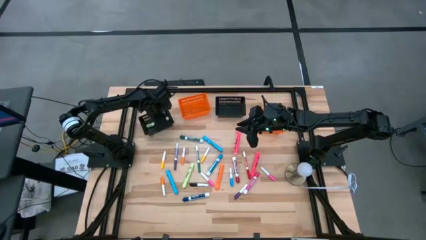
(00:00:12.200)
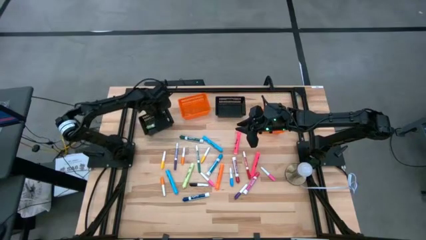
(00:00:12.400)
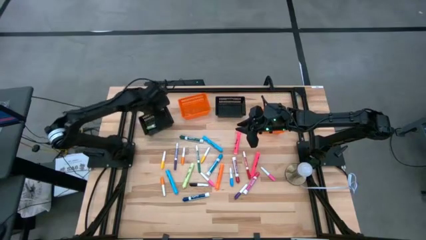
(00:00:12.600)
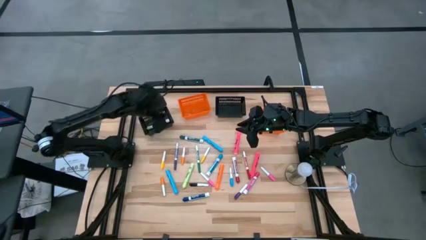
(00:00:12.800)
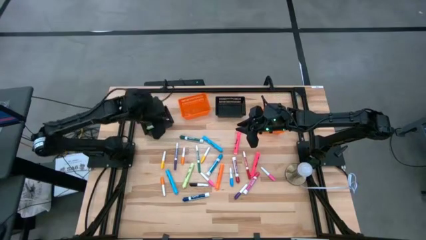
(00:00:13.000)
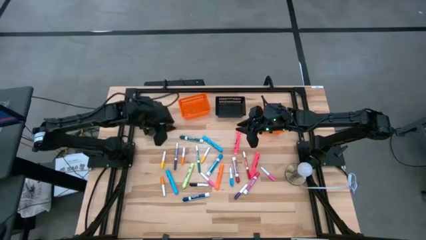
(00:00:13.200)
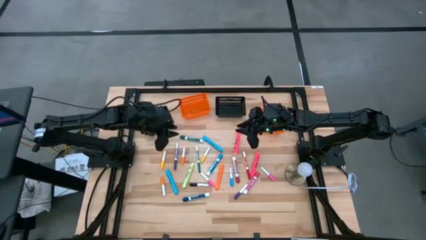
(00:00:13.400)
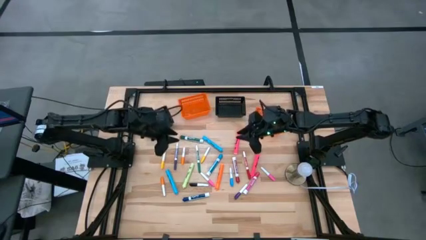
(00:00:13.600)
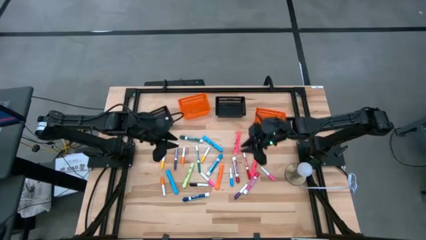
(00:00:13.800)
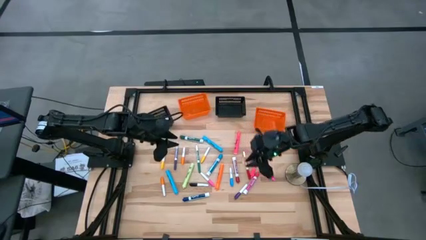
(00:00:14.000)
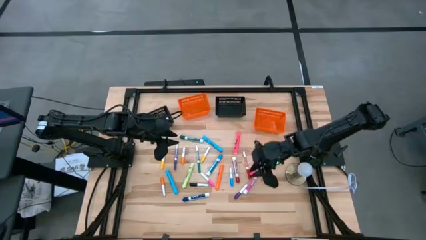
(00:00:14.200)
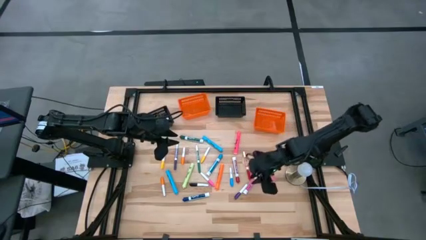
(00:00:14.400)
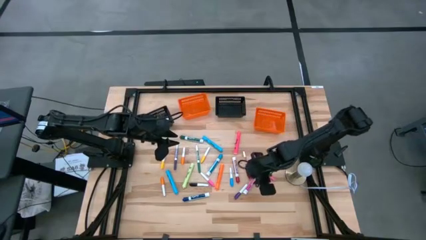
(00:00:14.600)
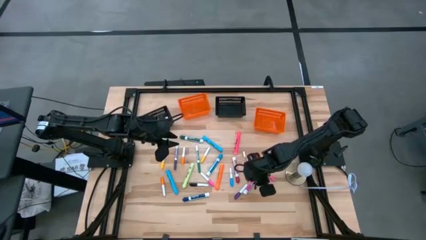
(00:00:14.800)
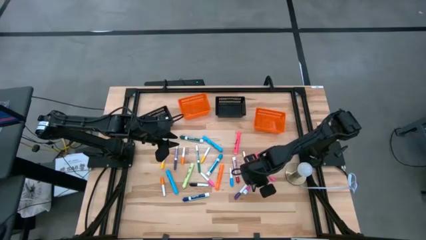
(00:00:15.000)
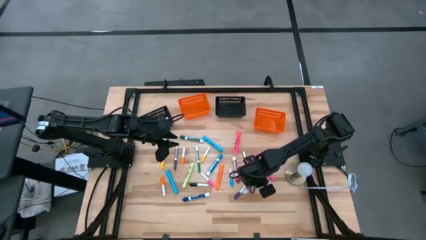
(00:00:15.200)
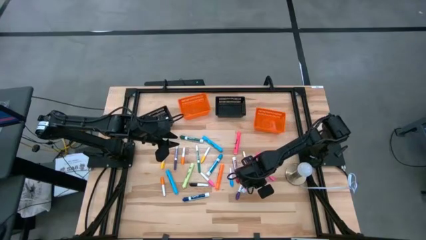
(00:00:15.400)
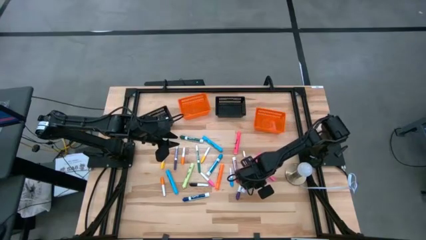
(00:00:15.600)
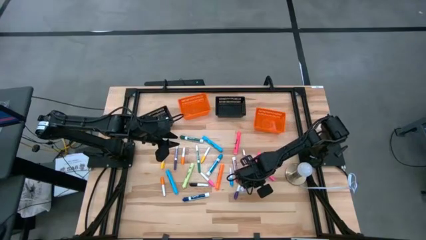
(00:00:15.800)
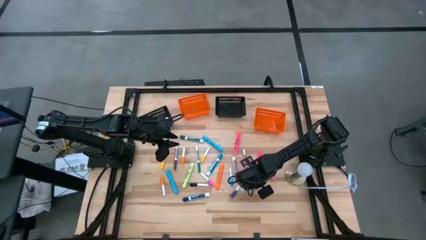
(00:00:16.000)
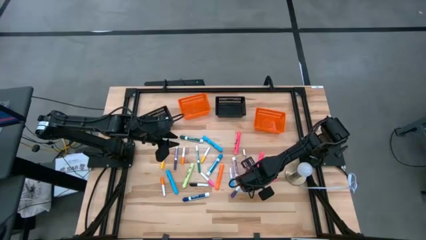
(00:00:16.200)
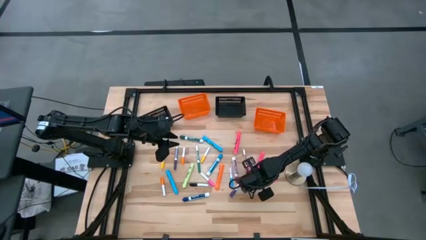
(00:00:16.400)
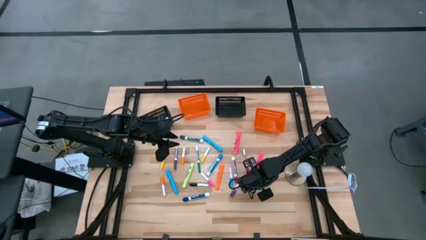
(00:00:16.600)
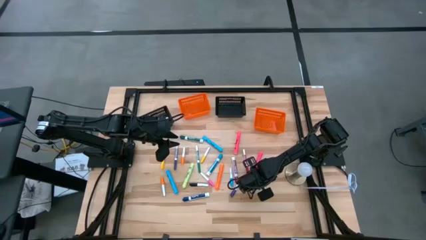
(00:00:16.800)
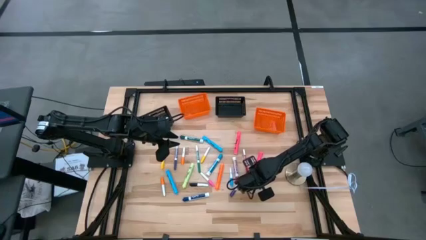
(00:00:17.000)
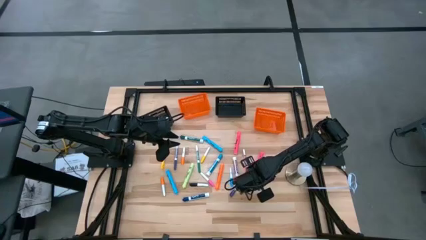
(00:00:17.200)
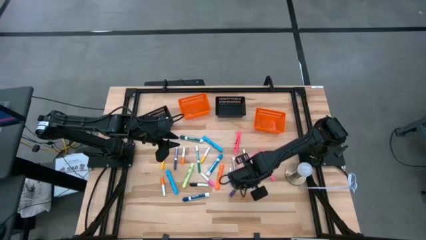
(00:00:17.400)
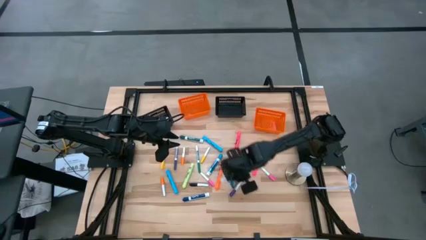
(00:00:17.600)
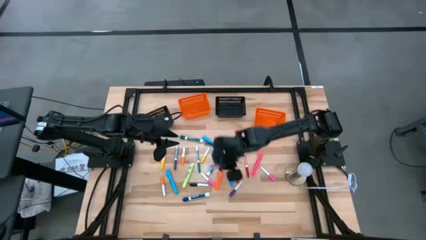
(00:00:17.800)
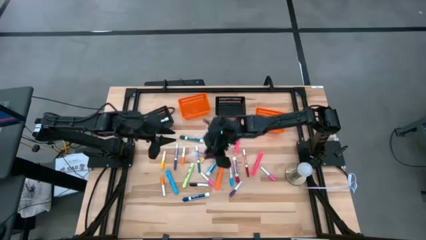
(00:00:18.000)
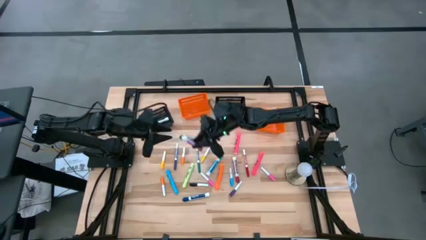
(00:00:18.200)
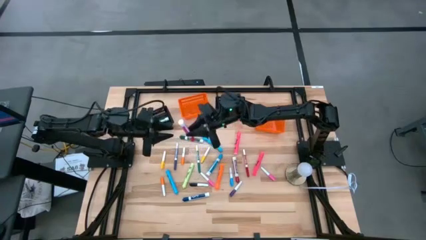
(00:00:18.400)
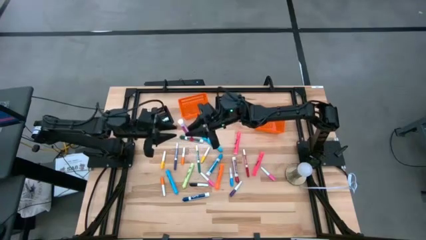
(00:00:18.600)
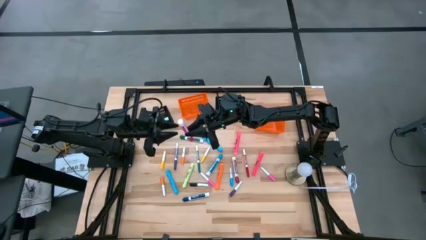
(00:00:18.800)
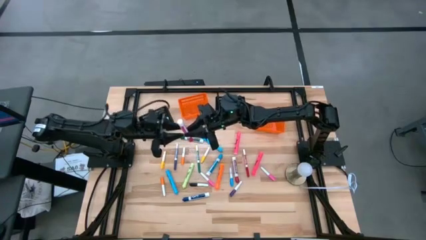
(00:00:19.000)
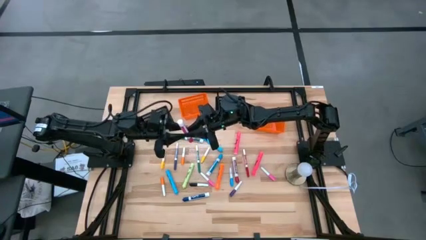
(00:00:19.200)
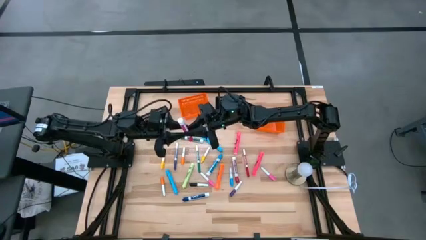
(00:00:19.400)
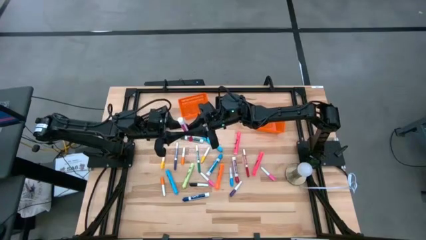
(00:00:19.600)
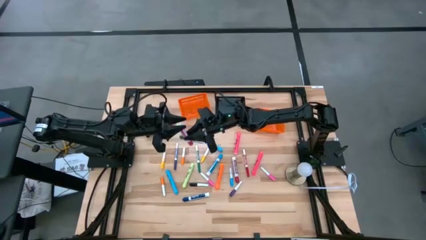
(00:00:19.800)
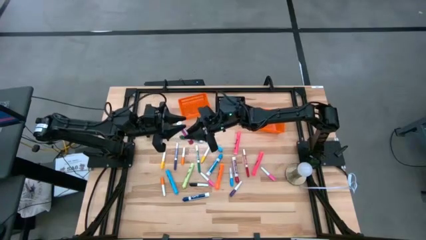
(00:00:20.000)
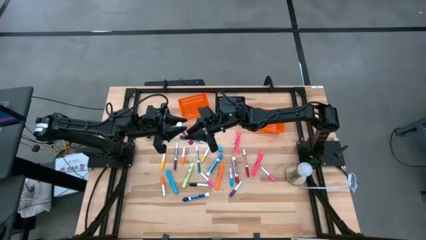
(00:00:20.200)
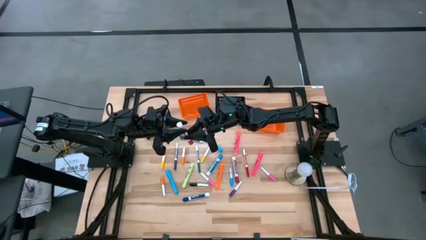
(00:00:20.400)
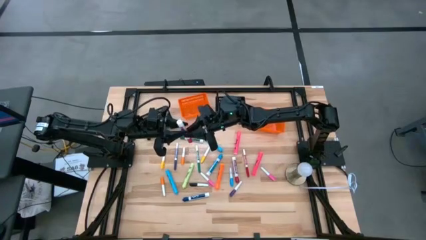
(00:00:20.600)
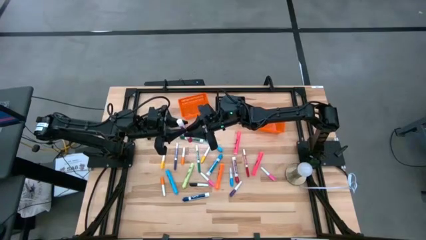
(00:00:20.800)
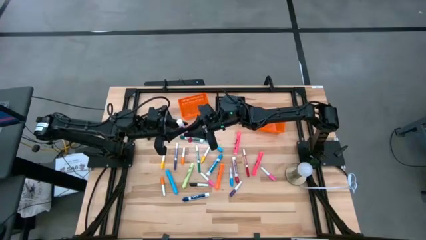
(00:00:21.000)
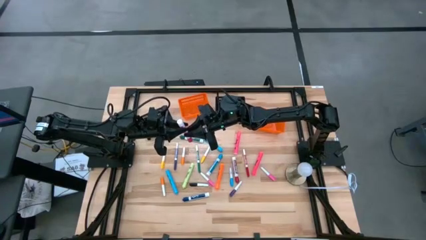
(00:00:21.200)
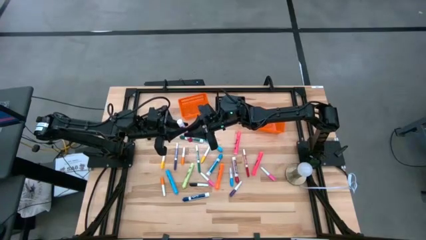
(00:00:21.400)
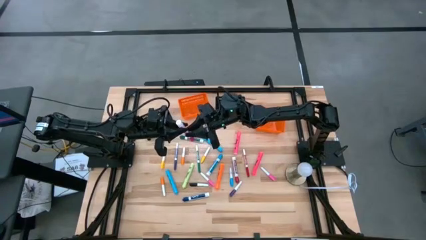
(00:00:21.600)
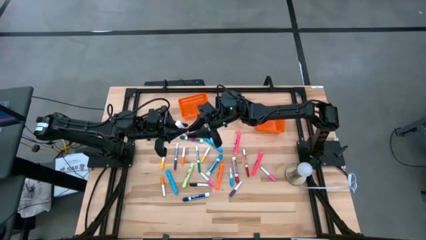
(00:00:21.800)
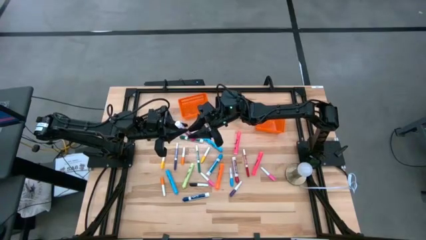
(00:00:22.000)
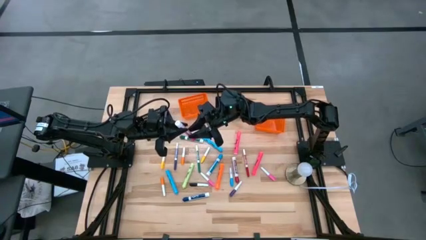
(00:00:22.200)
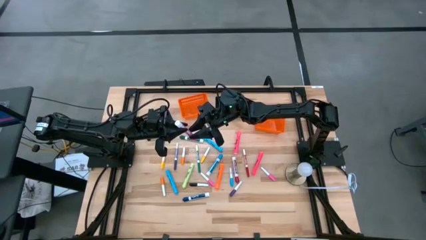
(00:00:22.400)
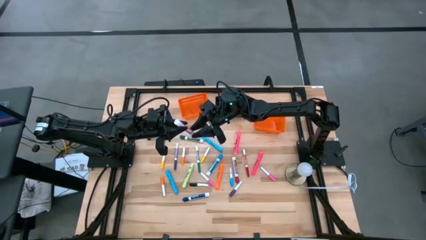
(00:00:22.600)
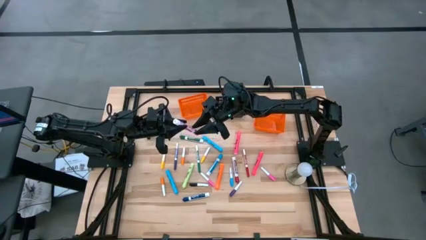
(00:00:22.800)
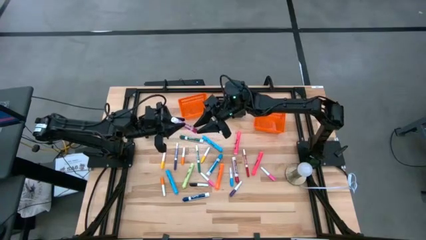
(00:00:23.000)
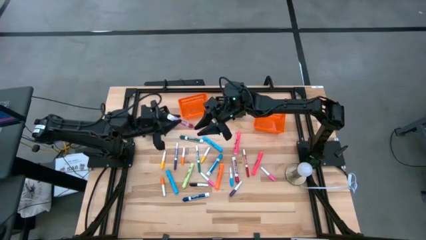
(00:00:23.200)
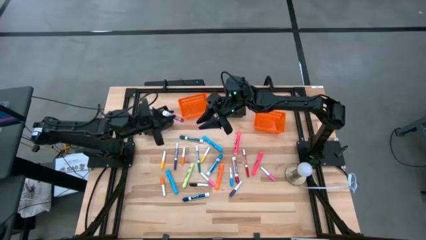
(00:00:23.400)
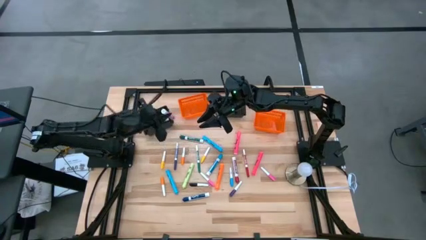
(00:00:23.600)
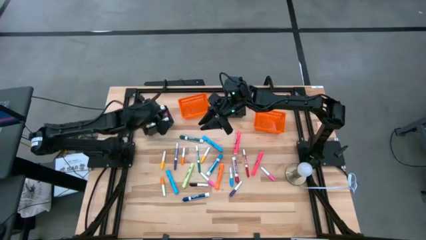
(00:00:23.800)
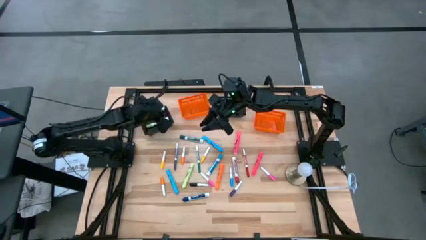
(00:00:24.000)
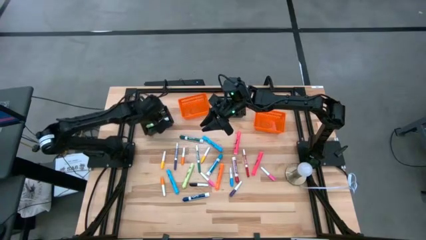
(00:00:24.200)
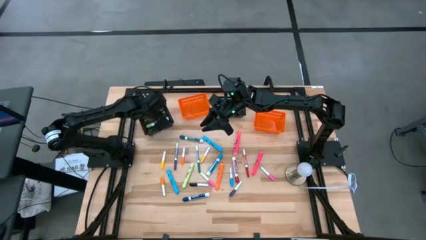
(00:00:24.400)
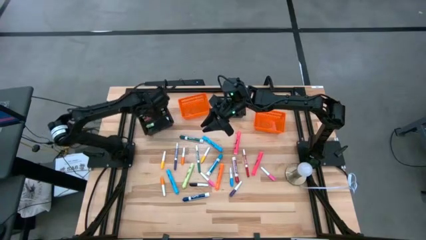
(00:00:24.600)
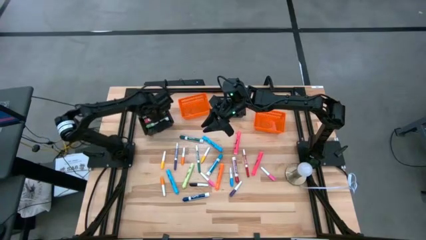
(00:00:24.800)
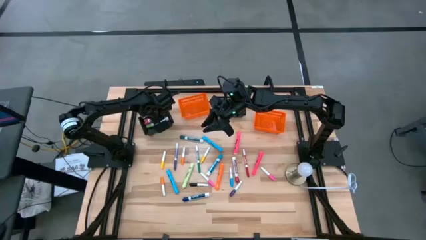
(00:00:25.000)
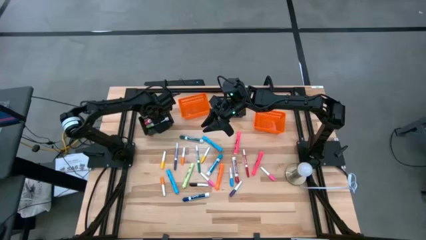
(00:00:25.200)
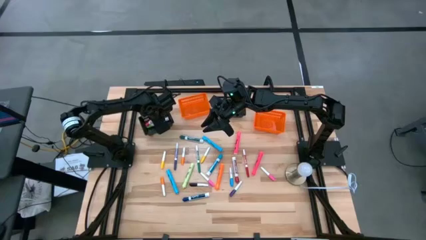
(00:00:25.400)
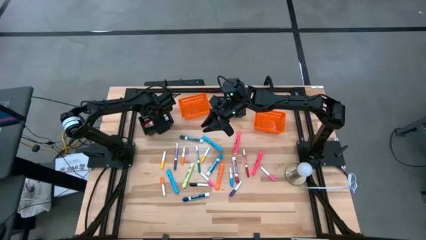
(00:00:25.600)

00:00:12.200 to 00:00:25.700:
Task: Pick & Place Markers
Put the large pink marker pen into the left black bin
